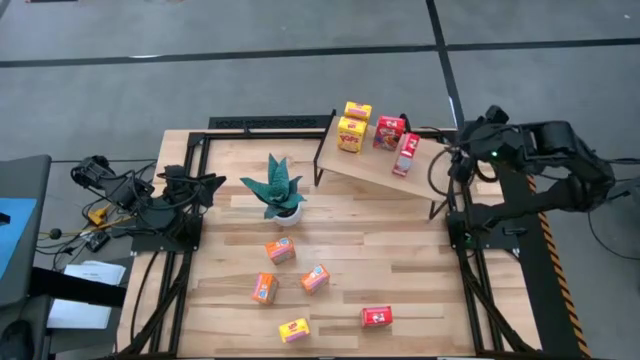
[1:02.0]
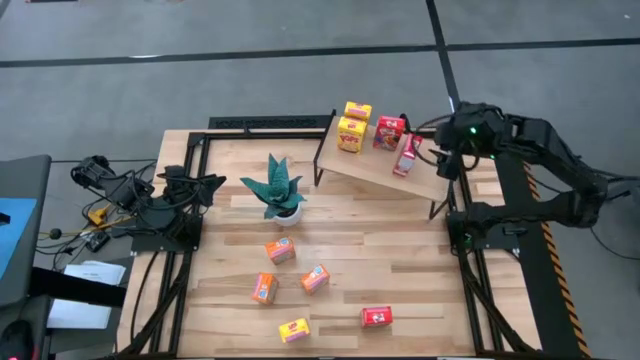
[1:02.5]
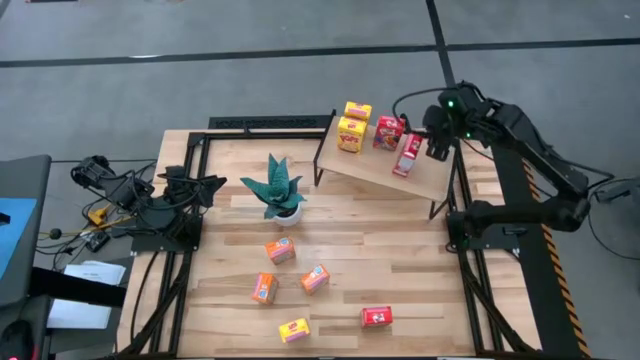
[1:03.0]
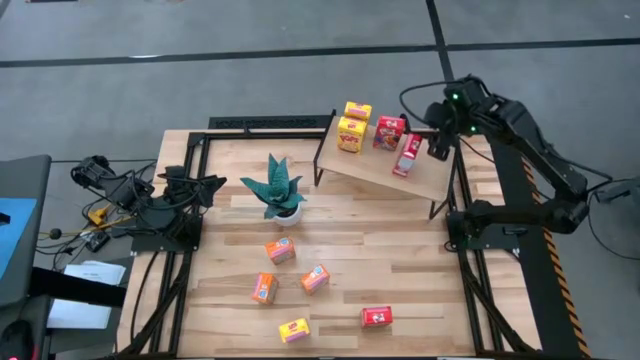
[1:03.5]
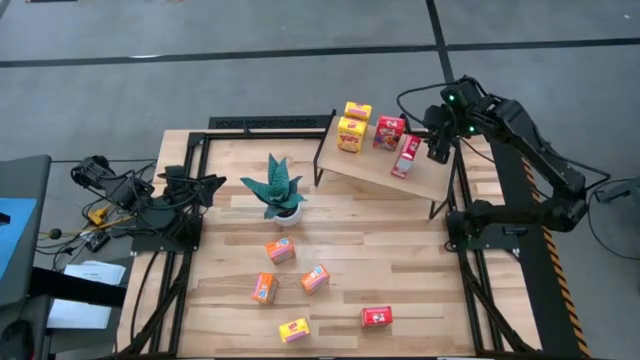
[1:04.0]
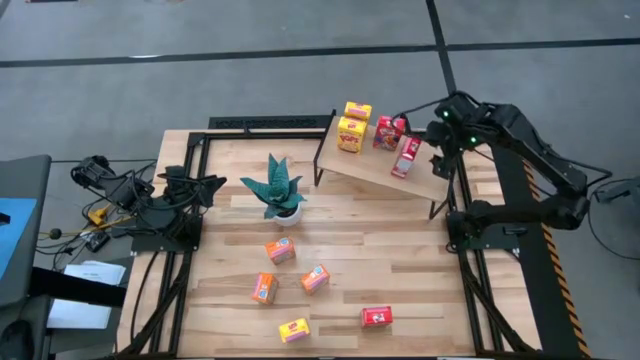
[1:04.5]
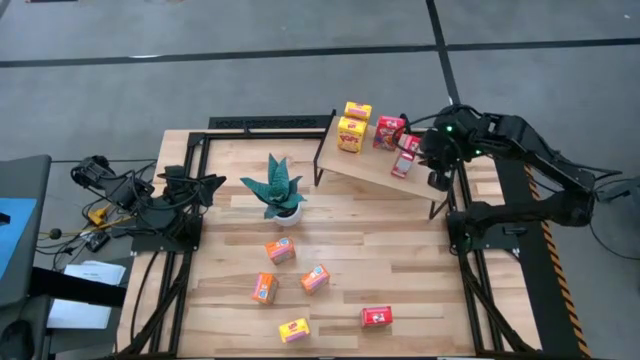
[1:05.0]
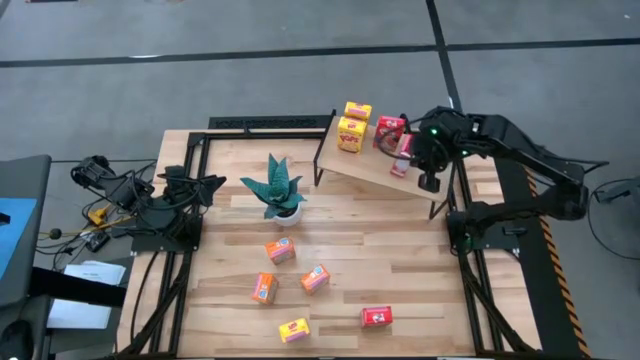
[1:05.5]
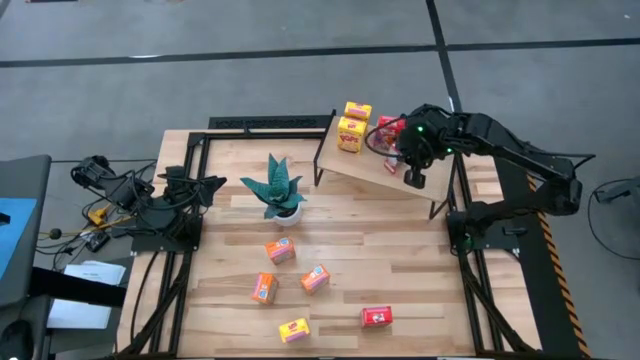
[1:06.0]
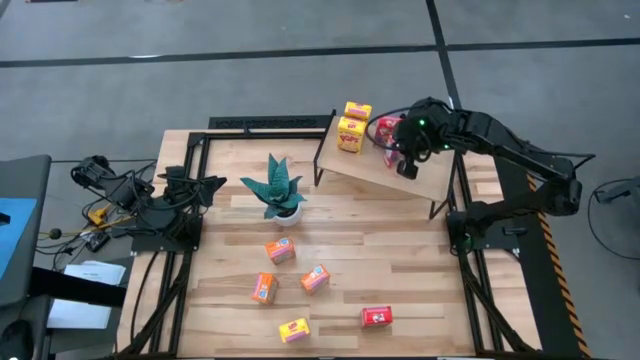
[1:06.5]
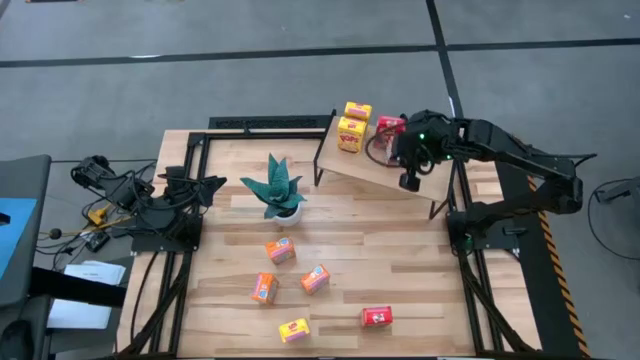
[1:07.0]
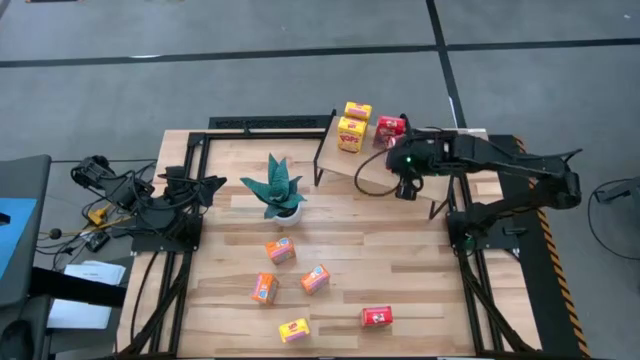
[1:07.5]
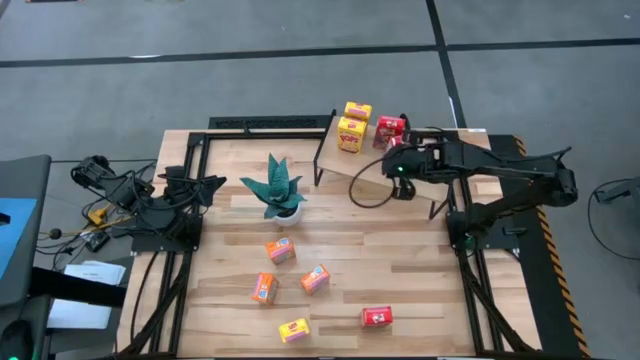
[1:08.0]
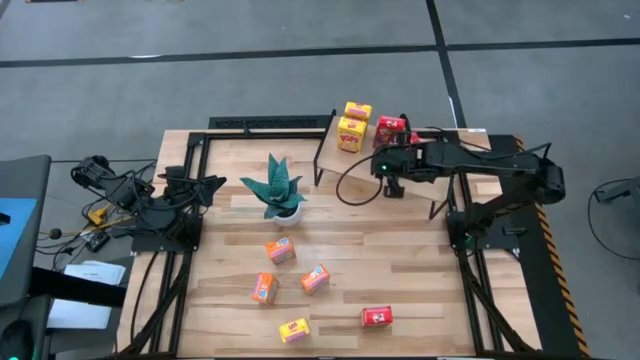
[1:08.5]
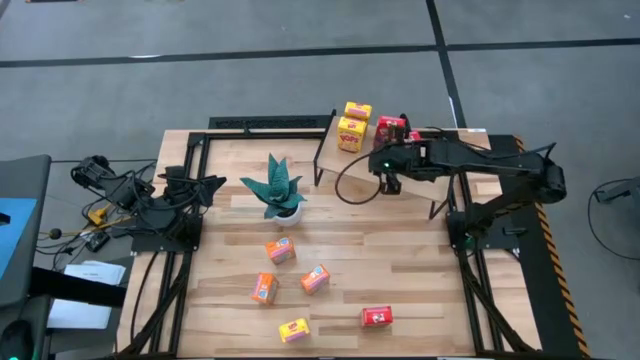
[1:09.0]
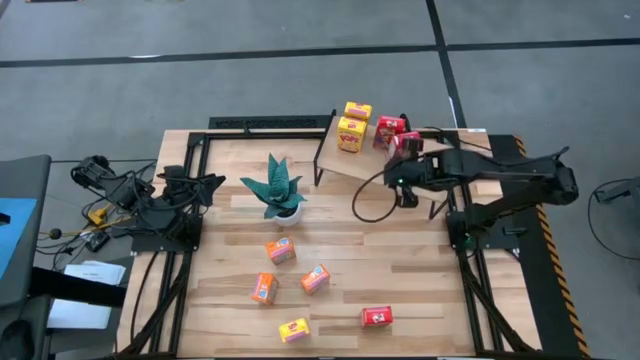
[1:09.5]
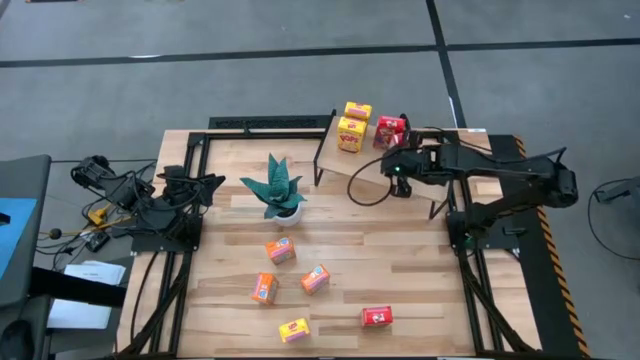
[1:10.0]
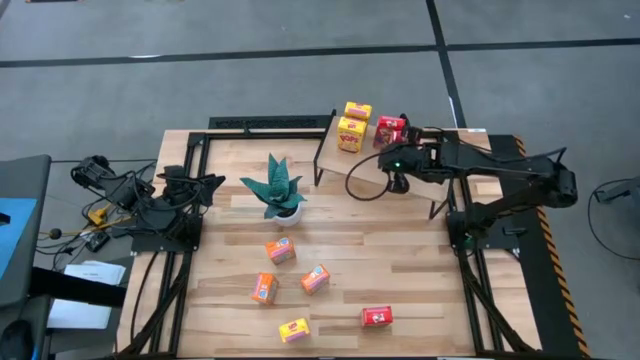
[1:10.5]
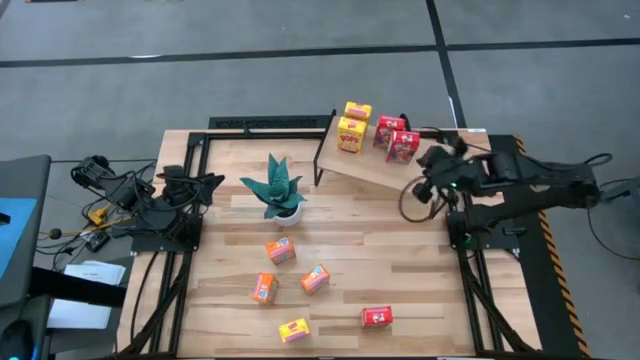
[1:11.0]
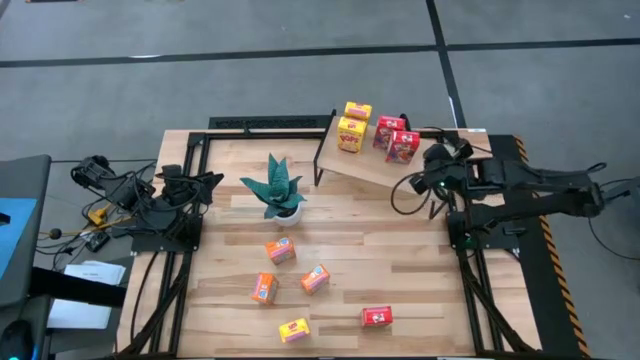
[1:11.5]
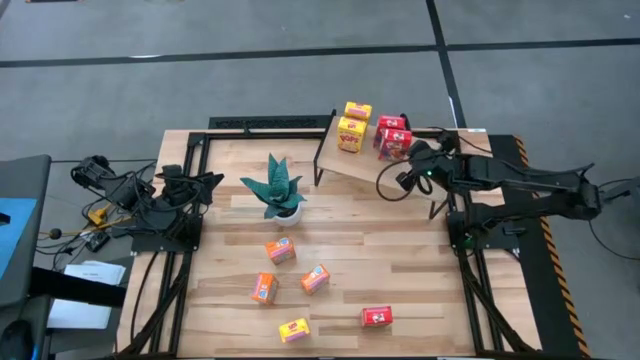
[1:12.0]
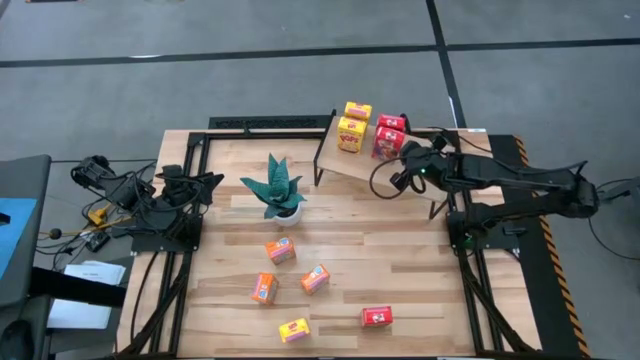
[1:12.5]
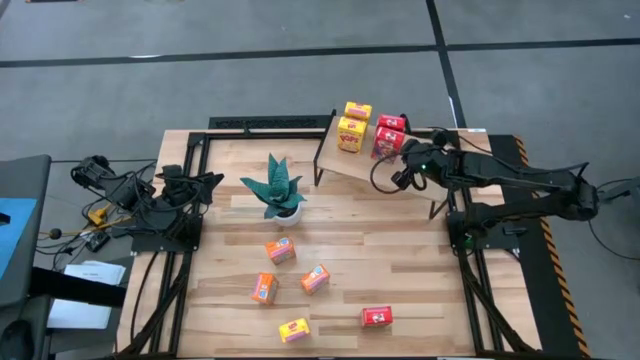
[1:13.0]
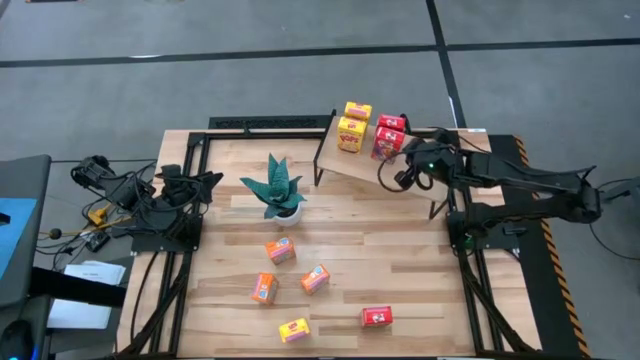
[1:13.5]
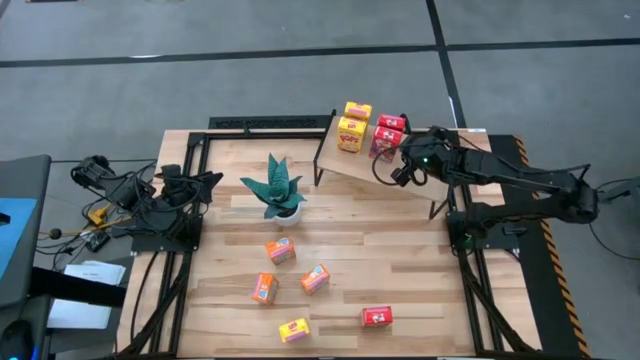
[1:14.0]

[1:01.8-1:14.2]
Task: Stack cereal on shelf
Put the top red cereal box on the shelf aligned with the other red cereal box

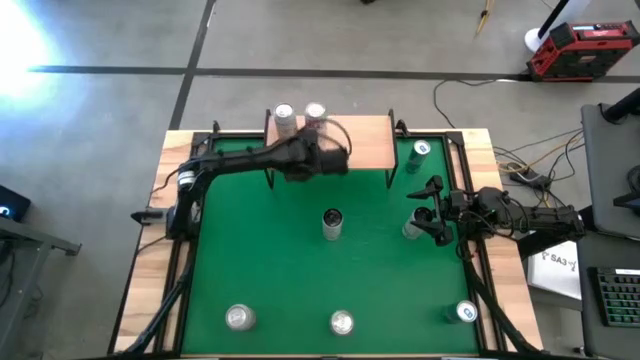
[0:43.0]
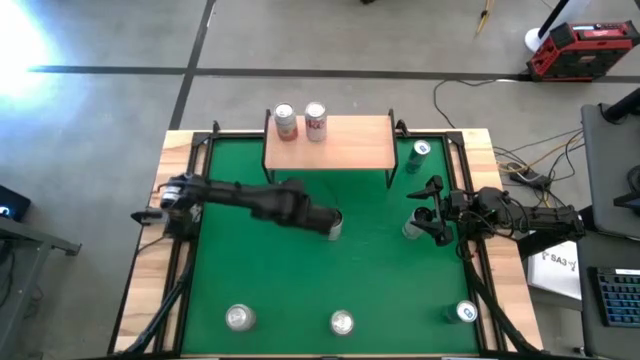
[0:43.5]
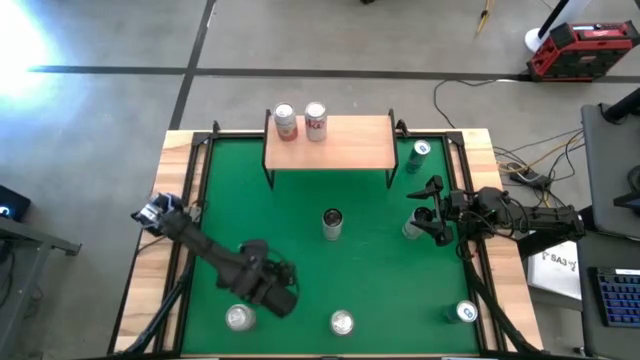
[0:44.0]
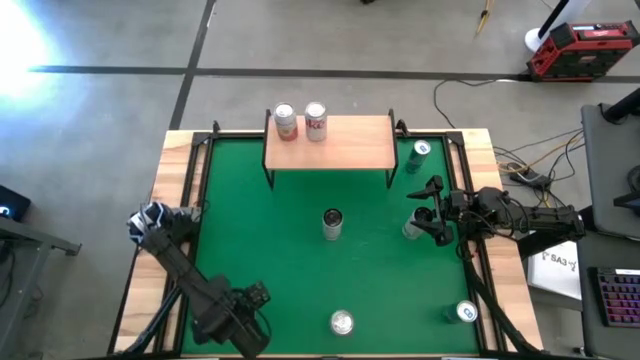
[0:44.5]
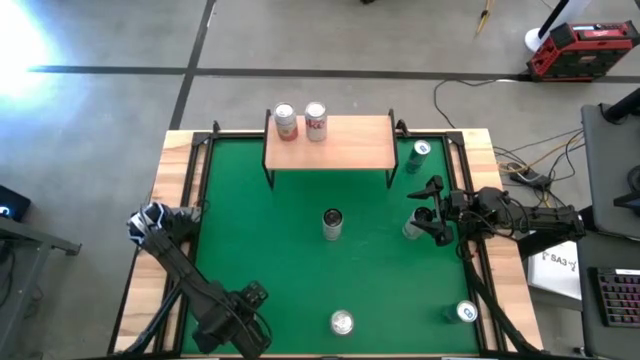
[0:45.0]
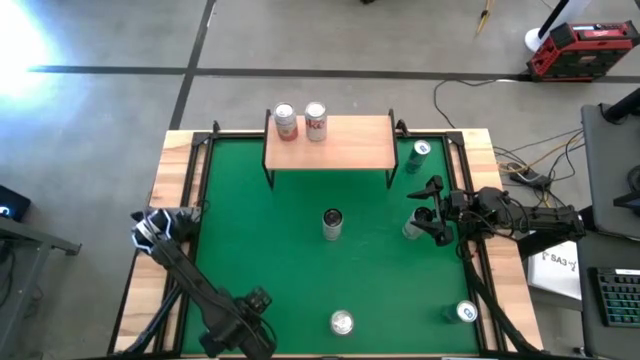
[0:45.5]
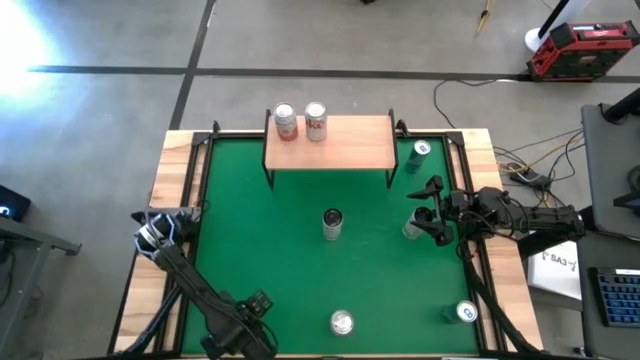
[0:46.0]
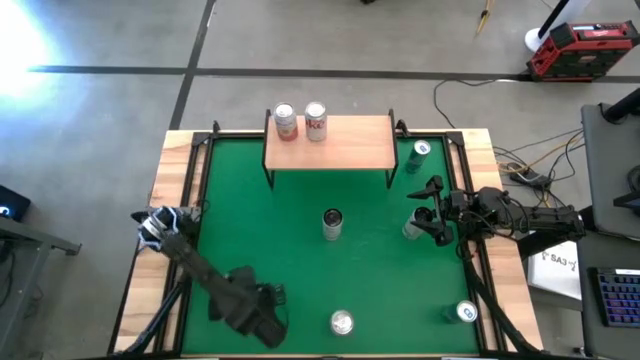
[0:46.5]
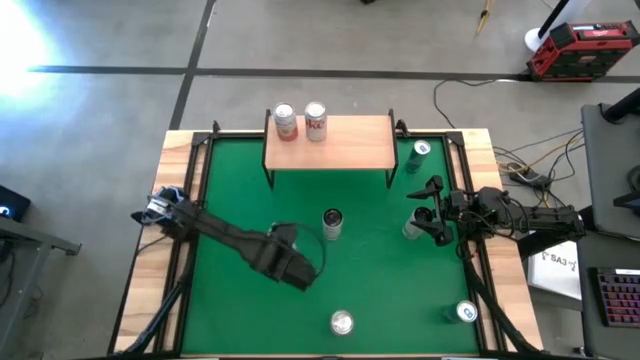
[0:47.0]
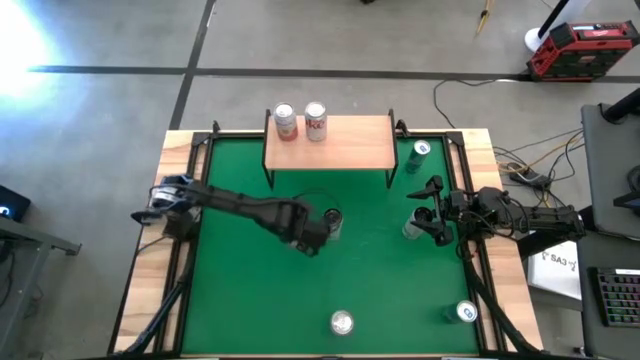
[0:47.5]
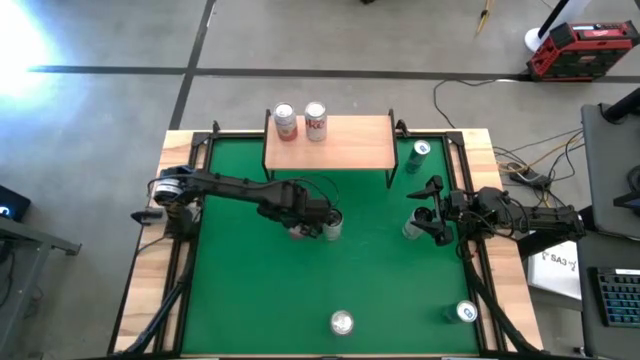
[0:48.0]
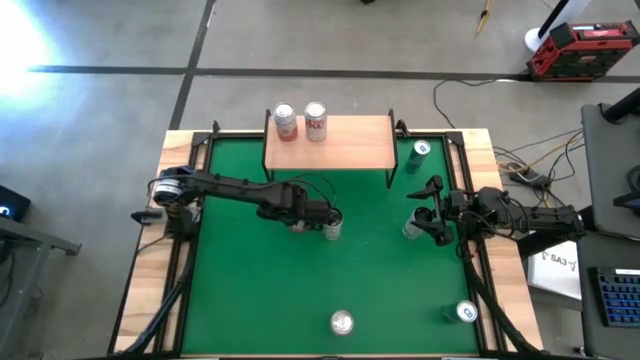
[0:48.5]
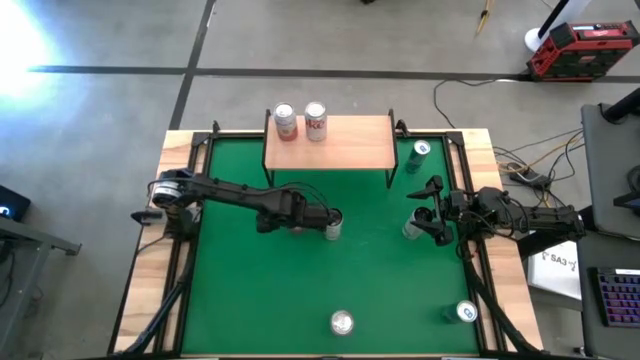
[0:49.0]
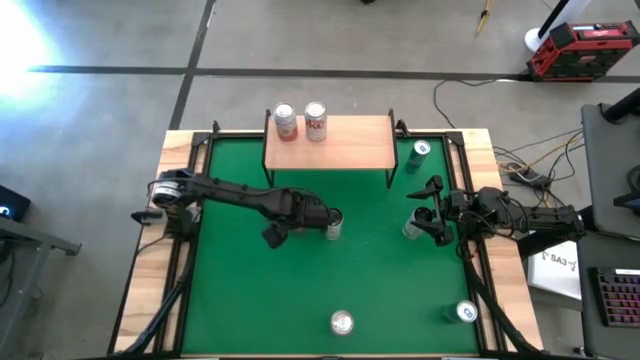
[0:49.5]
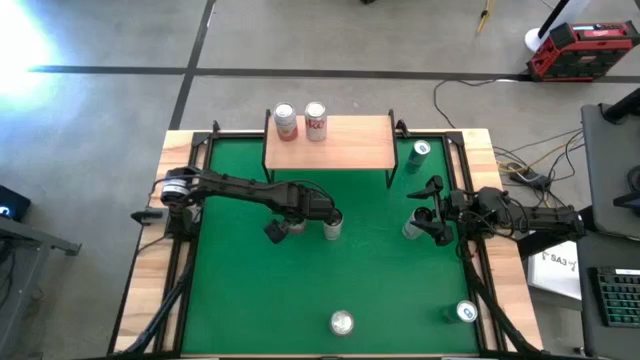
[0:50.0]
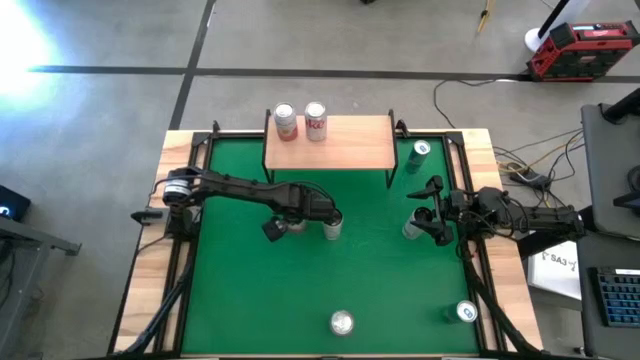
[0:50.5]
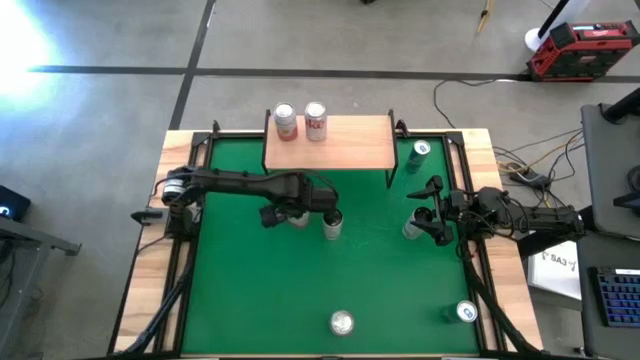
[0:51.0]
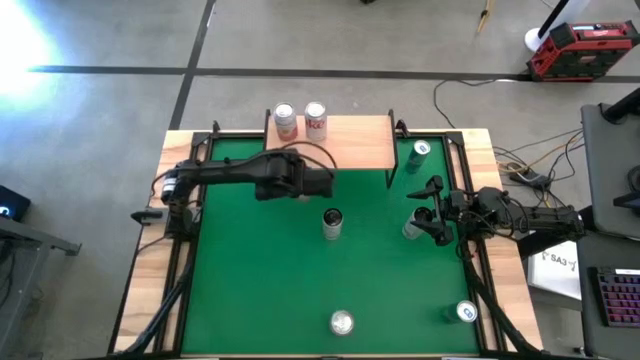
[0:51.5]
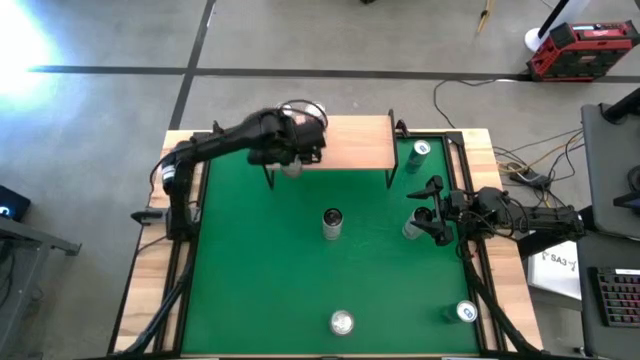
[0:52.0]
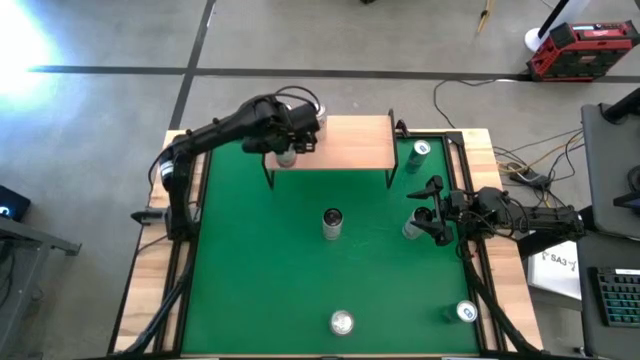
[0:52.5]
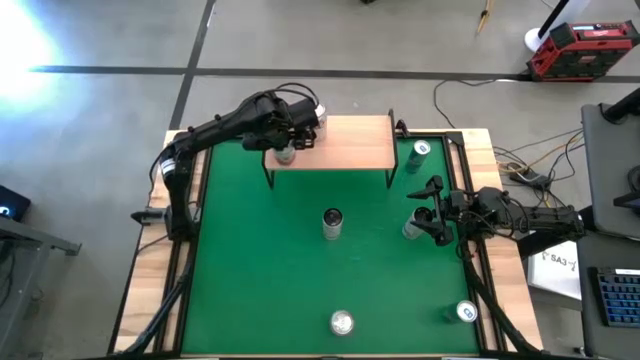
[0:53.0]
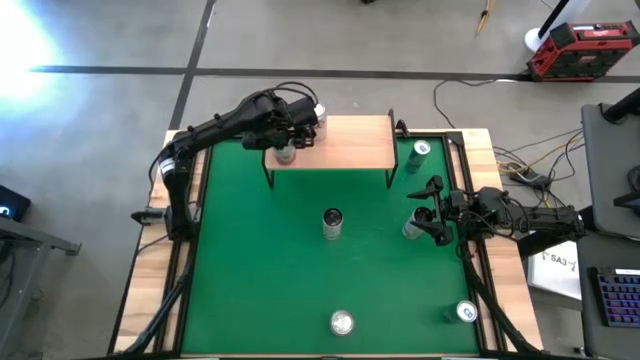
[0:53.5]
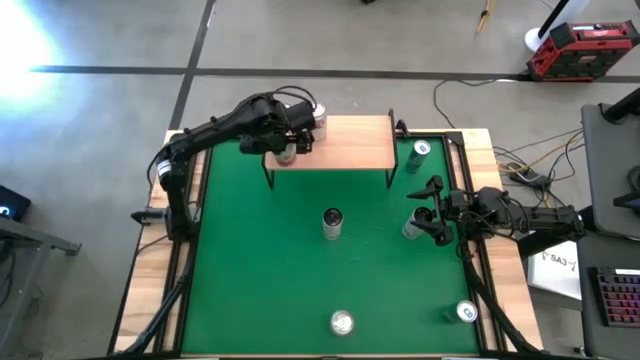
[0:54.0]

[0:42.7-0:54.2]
Task: Place canned beverage on shelf
Put the pink-white soda can on the shelf aligned with the other pink-white soda can
